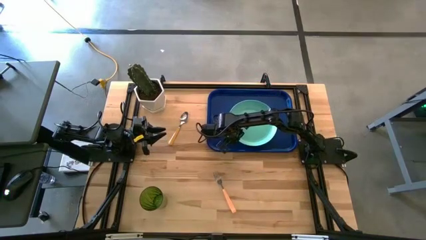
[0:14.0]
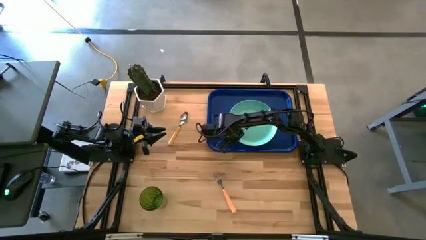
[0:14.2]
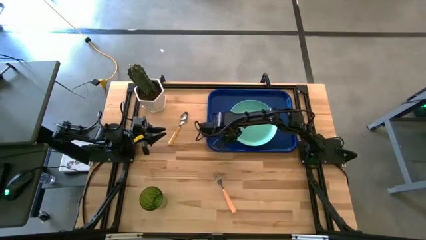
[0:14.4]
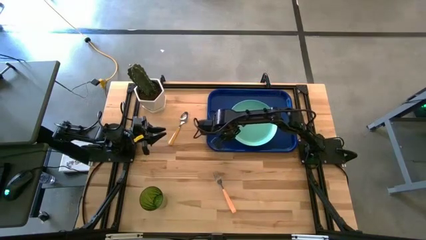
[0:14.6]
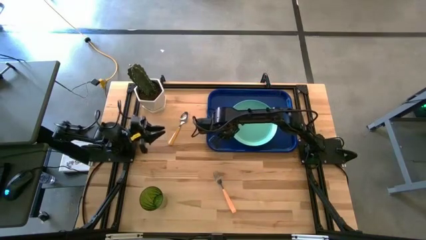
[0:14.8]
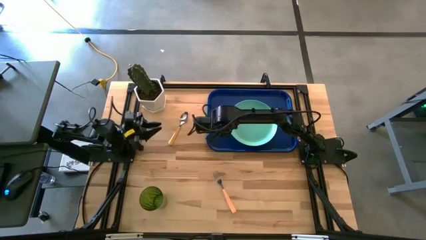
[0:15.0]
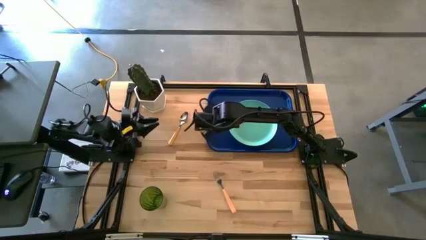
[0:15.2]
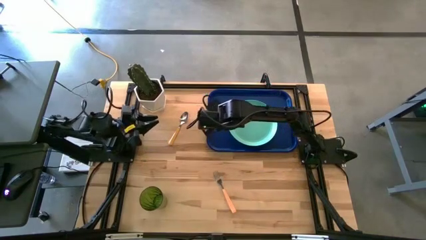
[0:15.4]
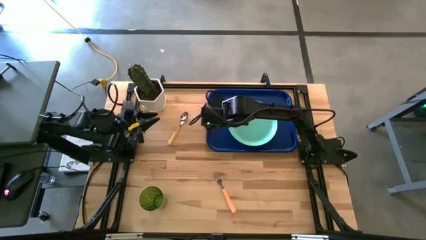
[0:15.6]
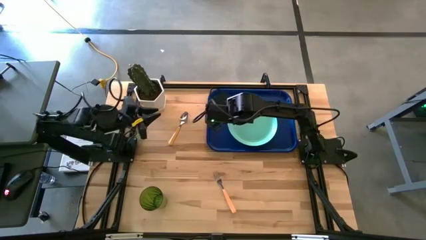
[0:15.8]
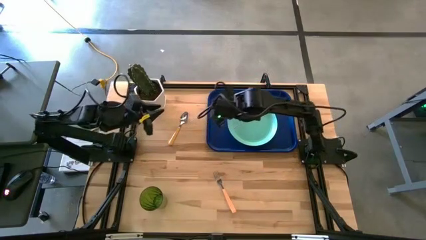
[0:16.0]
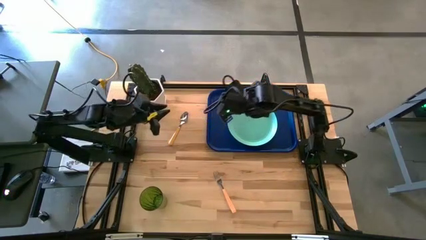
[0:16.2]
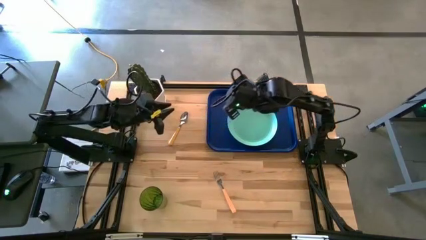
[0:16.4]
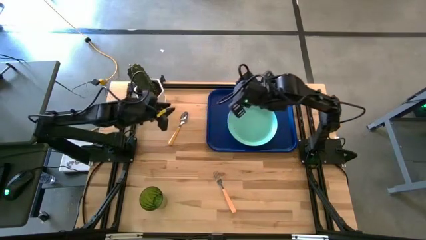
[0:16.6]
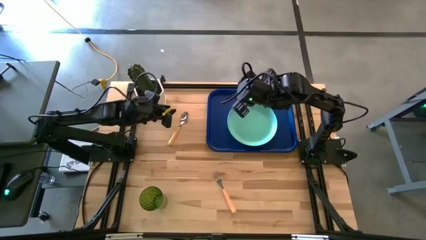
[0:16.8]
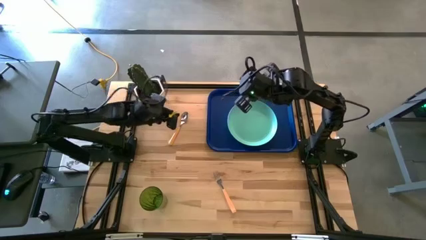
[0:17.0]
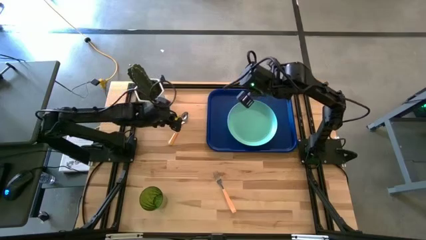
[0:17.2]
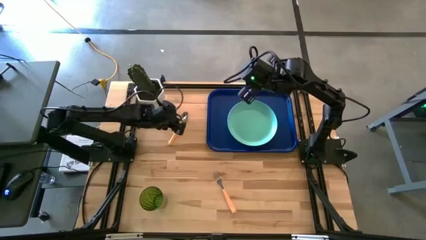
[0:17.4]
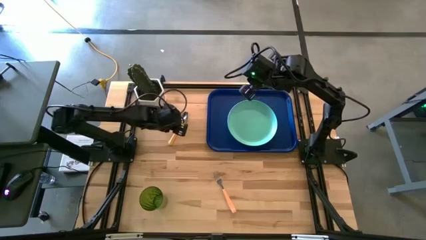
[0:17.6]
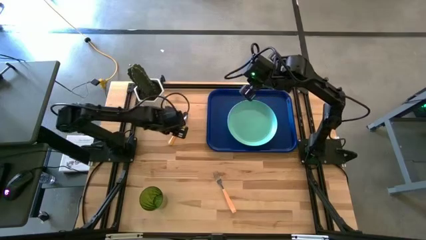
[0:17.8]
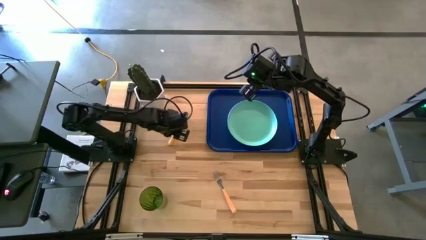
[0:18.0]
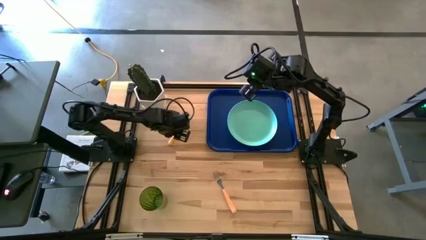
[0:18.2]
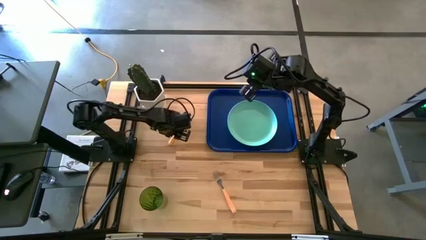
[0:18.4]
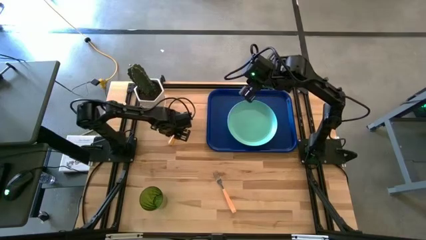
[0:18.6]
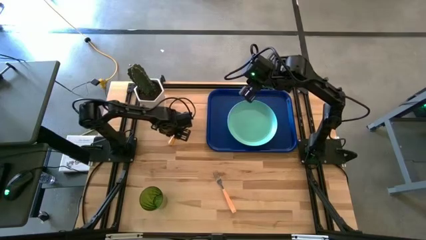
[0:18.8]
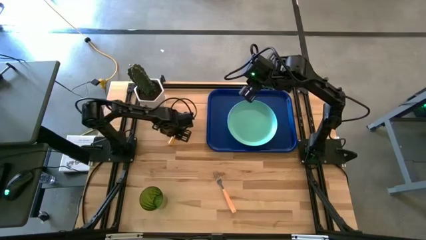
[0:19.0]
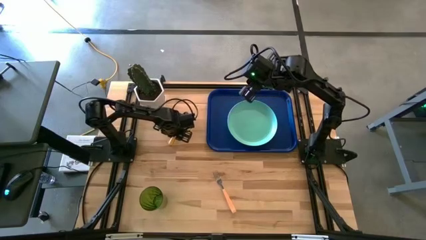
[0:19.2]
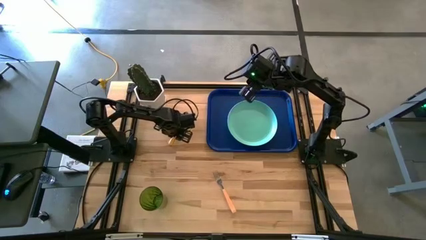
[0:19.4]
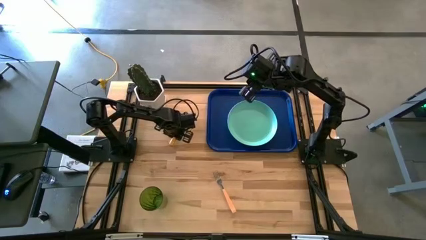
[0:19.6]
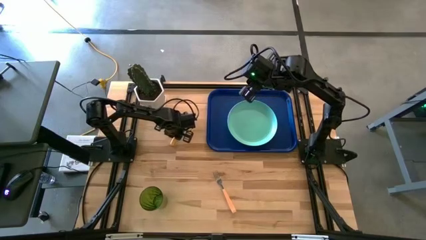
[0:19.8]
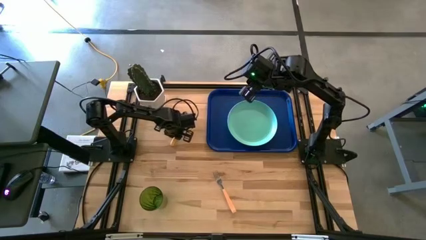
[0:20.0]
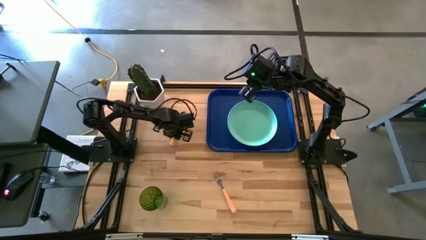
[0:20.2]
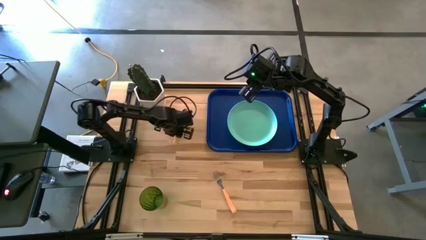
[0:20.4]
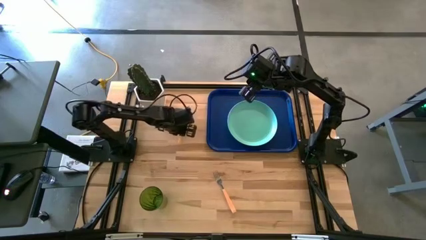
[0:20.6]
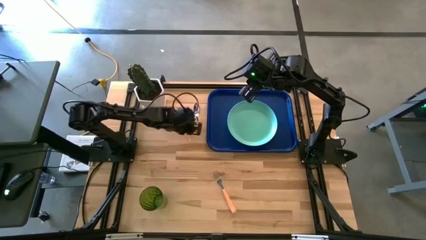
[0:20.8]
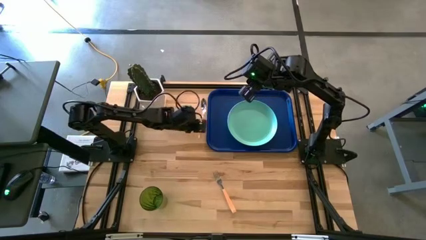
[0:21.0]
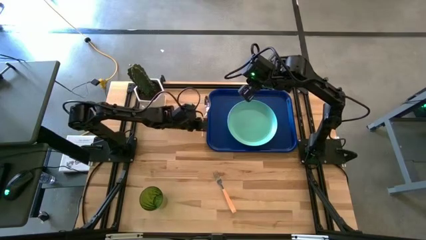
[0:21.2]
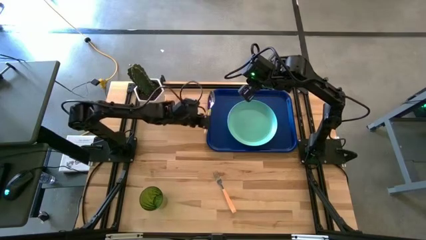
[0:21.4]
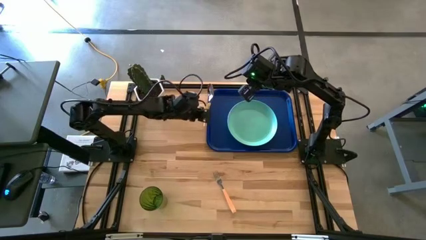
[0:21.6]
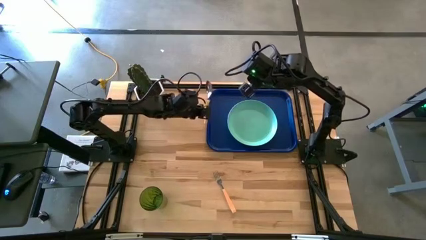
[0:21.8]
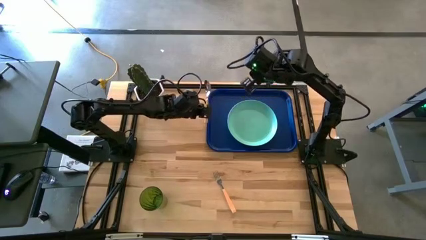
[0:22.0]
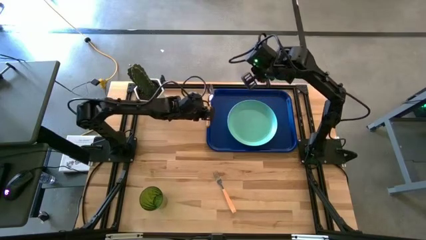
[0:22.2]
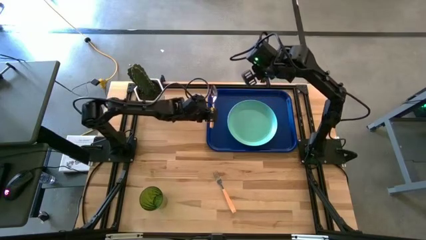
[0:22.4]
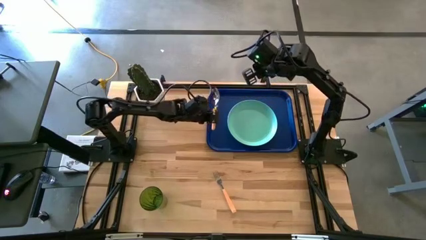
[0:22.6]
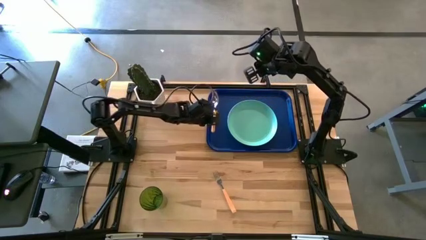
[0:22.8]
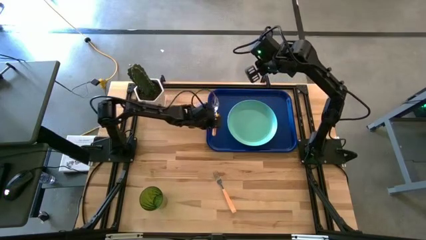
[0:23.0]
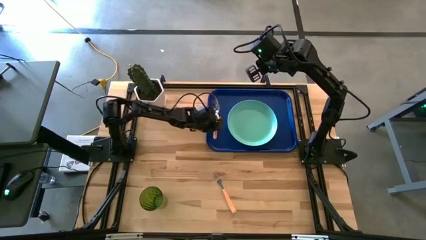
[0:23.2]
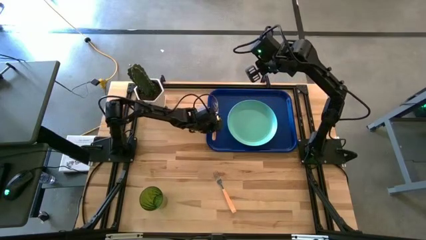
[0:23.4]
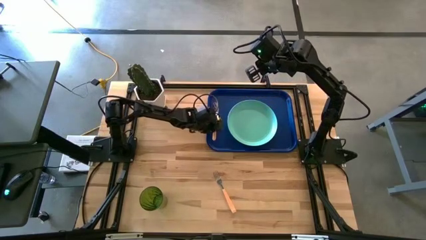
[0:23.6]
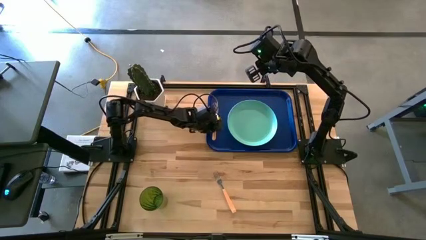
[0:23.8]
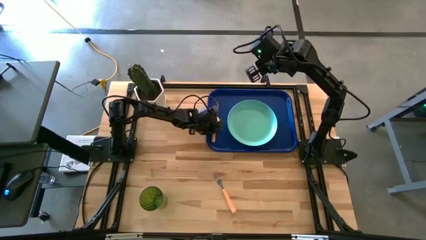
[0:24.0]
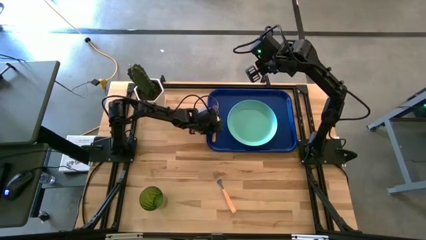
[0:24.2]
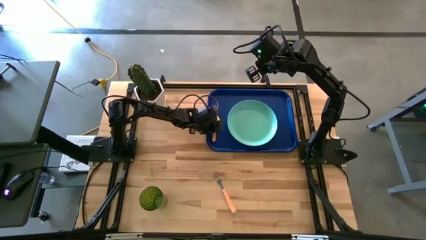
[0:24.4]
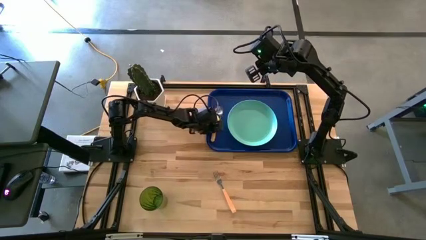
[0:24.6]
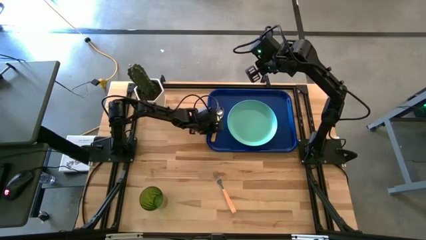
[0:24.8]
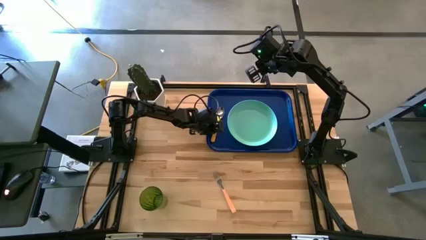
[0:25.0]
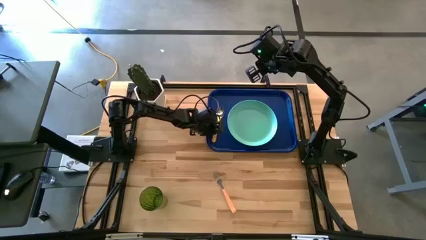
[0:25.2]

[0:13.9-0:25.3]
Task: Pick and place plate/cup/fork/spoon on tray
Put the spoon on the left side of the light green plate on the blue tray
